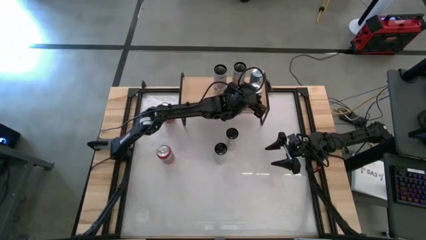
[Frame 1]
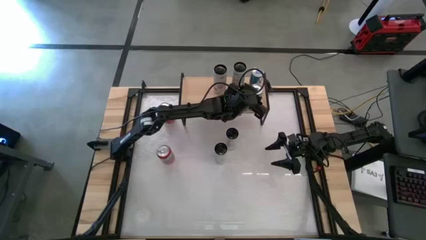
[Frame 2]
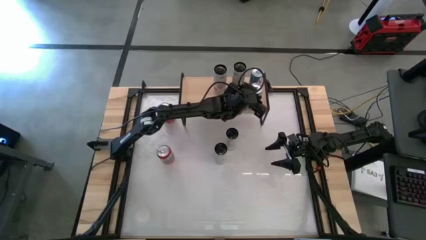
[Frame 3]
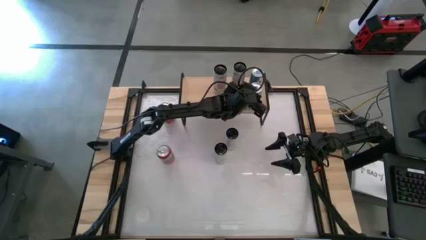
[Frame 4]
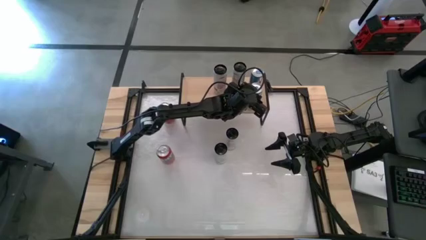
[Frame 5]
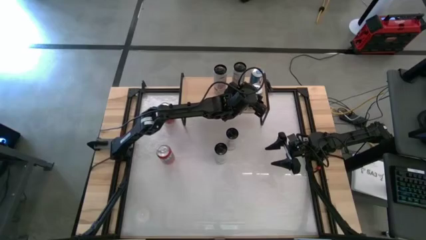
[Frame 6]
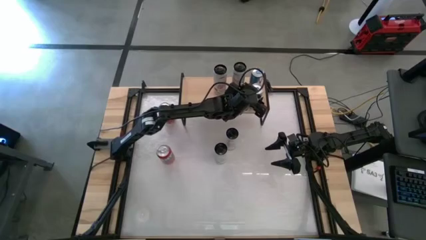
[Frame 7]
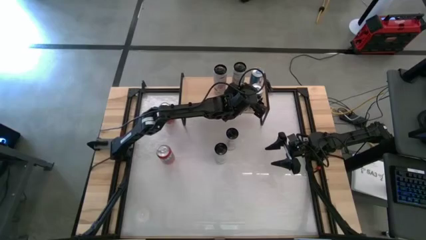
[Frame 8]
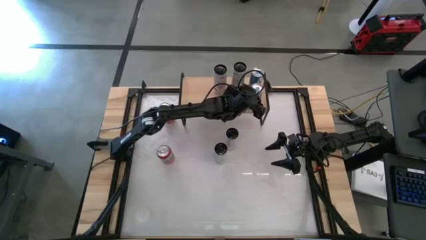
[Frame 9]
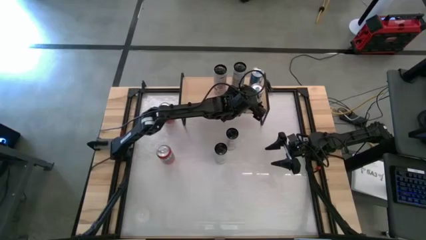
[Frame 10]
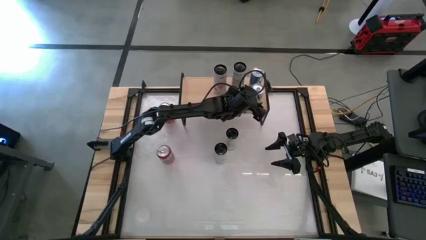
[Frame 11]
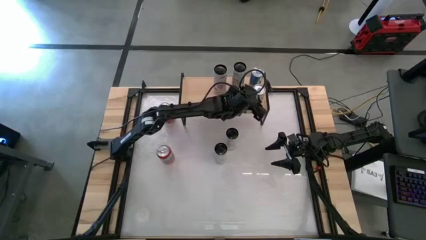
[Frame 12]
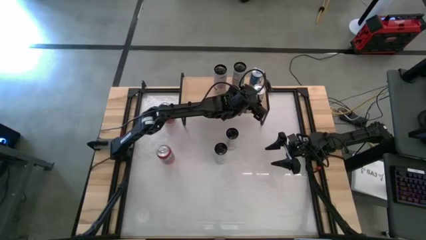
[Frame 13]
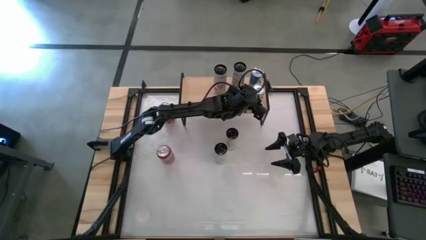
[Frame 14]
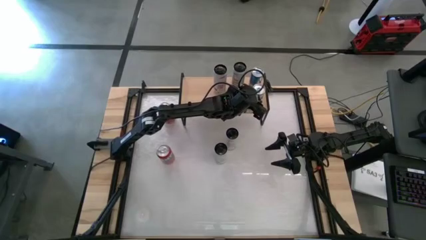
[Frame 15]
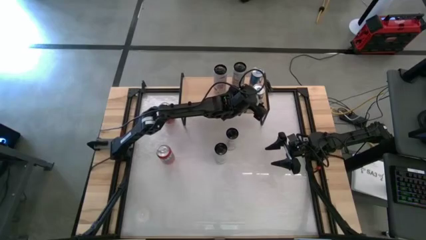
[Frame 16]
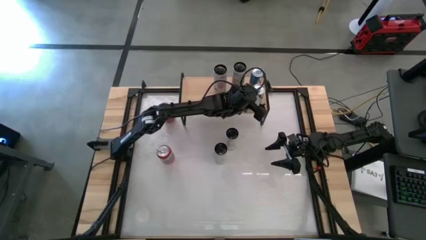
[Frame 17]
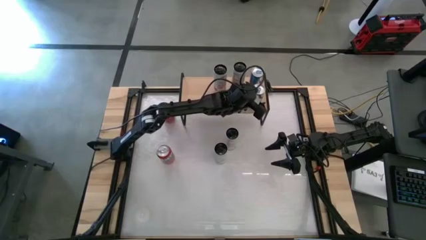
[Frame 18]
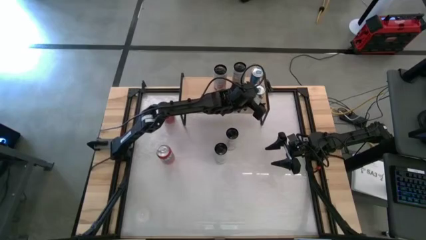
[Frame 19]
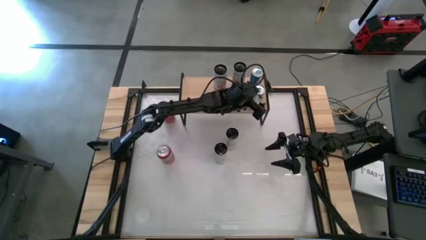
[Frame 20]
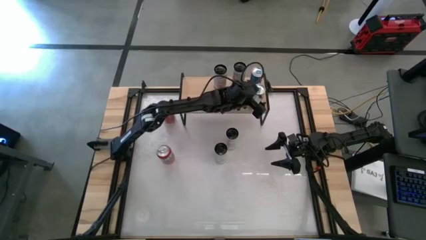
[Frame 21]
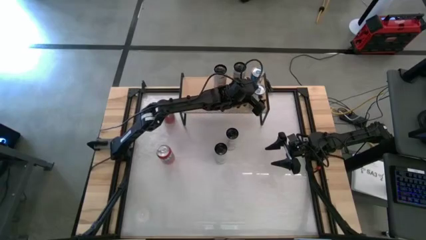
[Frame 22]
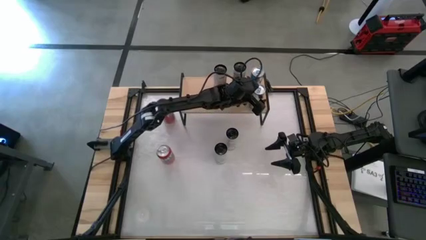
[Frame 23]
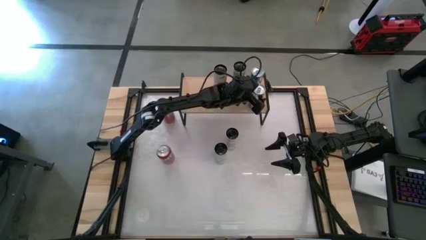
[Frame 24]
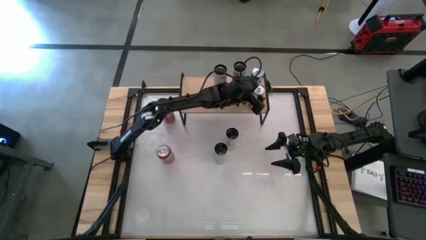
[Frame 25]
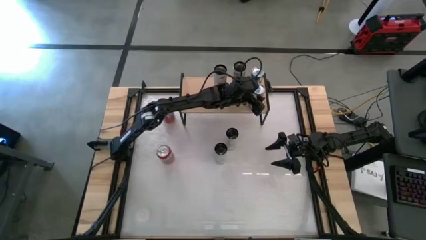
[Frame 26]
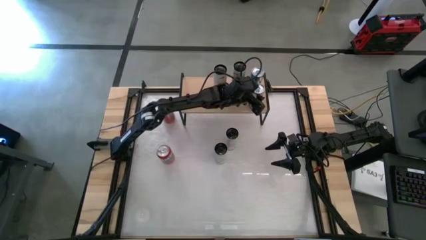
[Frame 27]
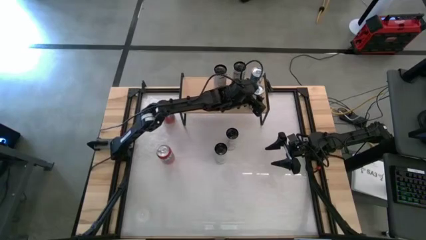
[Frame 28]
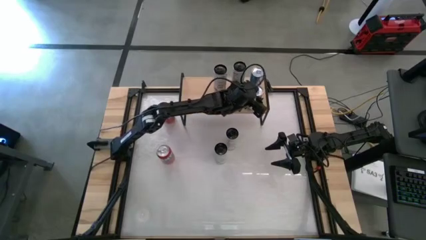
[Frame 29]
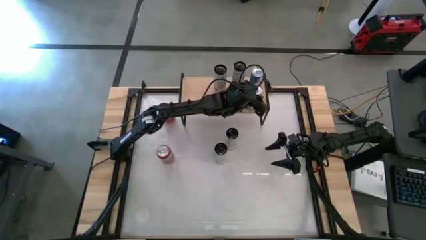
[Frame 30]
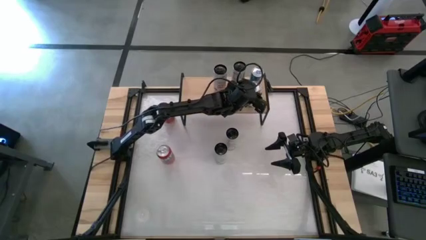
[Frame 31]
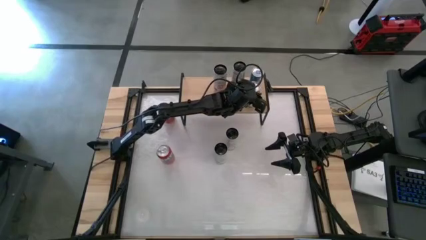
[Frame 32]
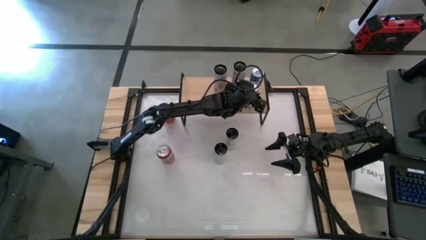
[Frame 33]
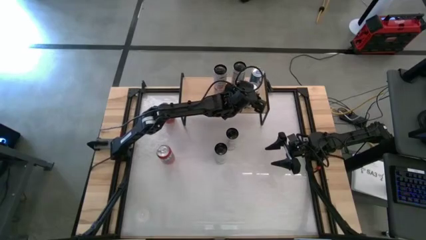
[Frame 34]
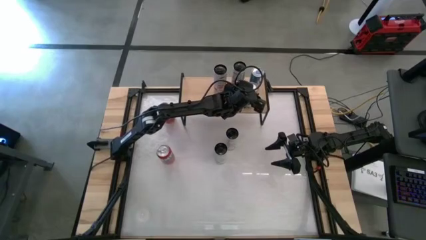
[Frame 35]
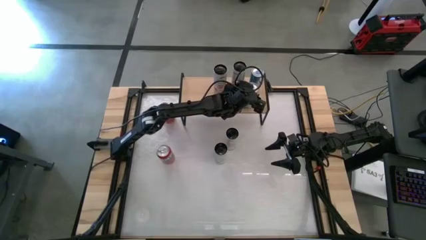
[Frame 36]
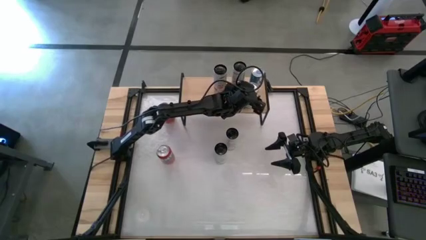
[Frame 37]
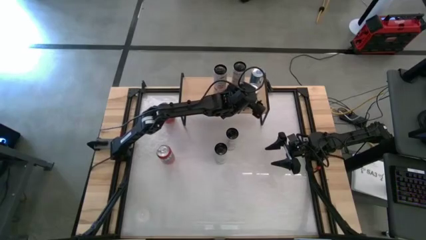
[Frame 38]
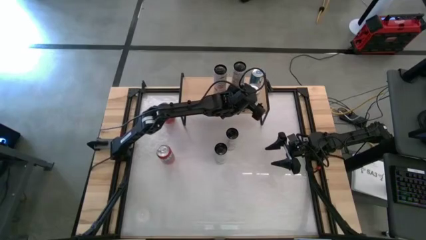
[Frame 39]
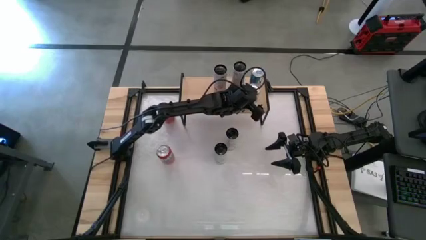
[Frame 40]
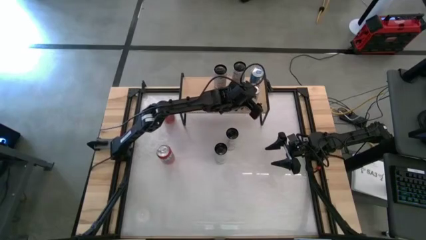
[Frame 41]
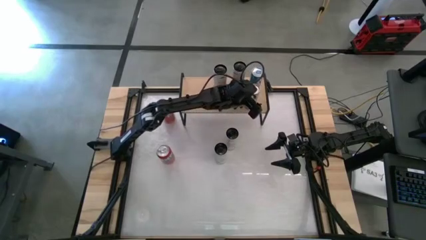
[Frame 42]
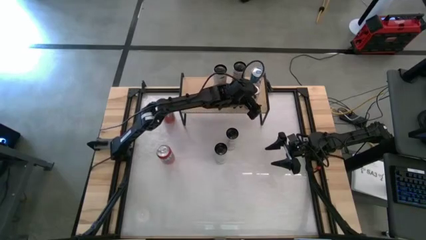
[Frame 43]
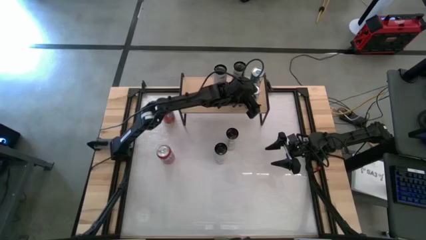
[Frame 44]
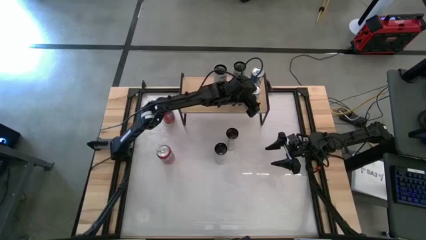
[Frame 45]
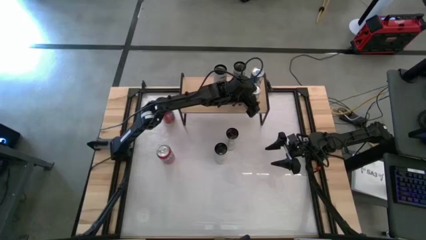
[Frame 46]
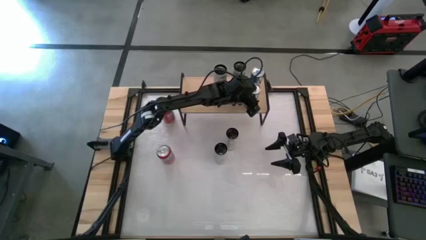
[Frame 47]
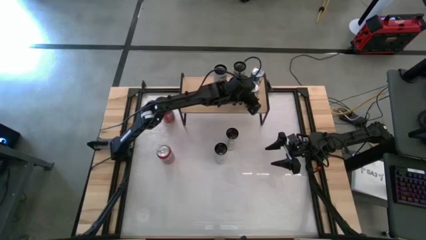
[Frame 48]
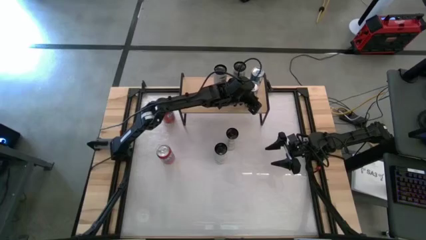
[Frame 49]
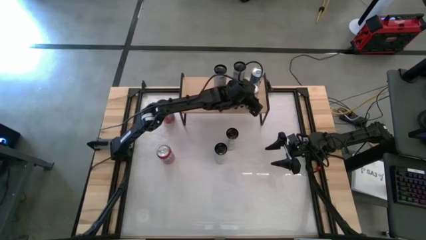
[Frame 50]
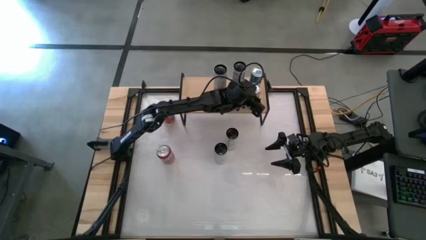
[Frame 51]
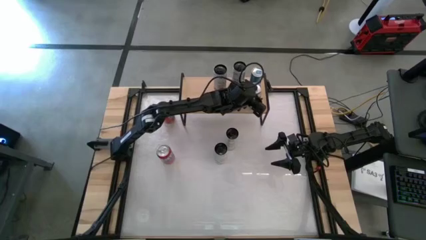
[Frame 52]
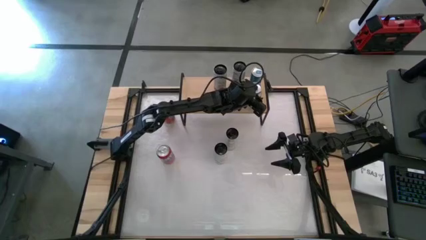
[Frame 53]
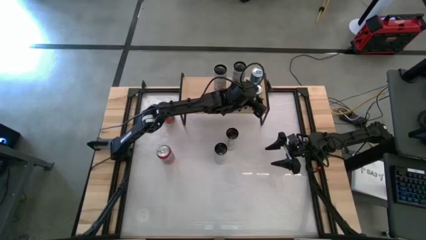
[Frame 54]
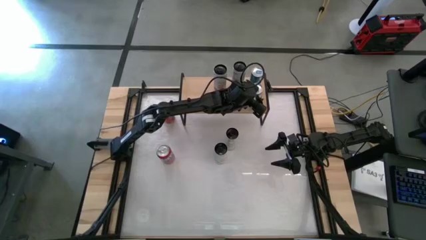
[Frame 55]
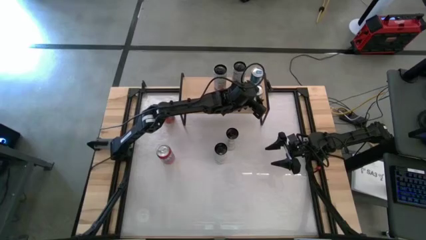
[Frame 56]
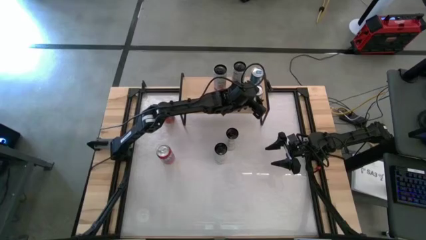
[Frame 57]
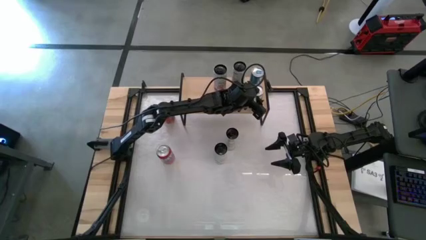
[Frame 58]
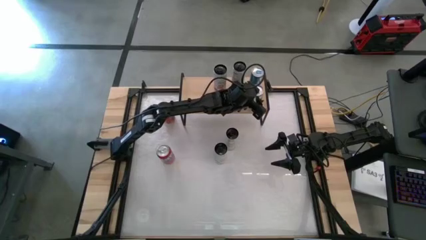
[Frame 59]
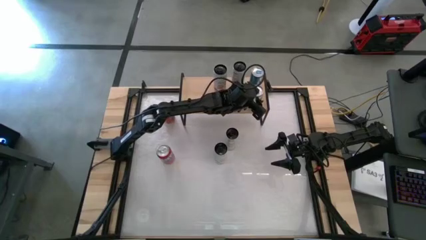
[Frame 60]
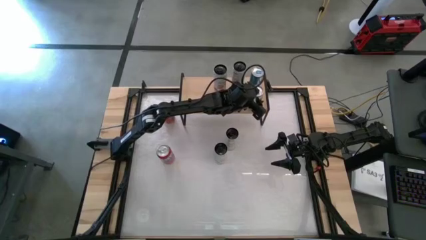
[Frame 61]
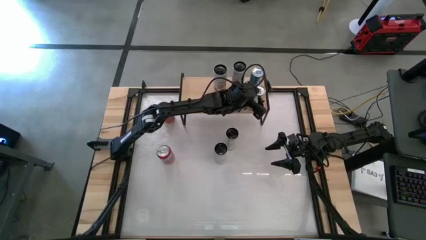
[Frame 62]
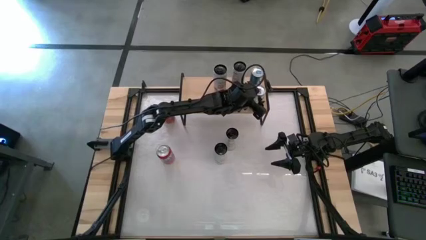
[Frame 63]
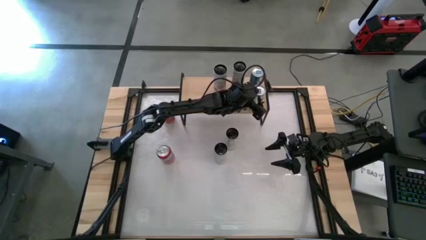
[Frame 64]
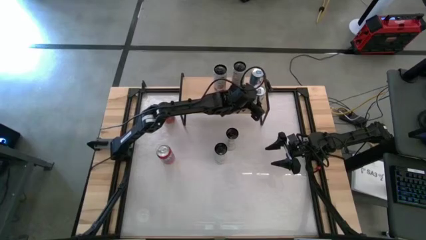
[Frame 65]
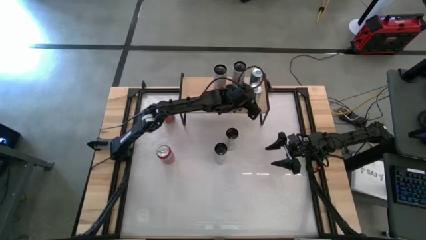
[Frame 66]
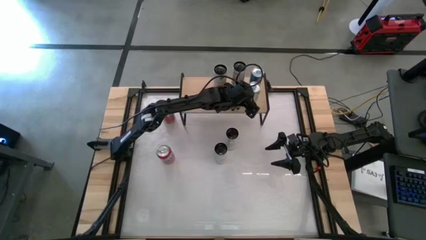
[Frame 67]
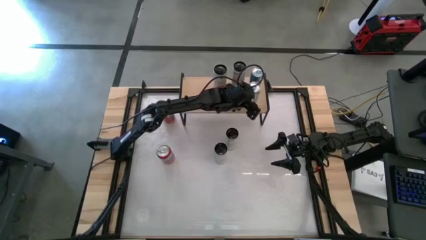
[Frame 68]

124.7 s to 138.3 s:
Task: Place canned beverage on shelf
Put the blue soda can on the shelf aligned with the other blue soda can

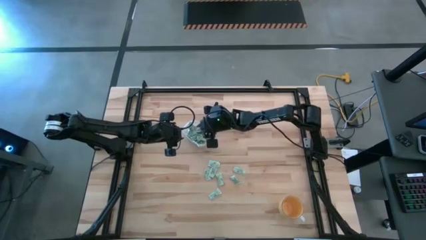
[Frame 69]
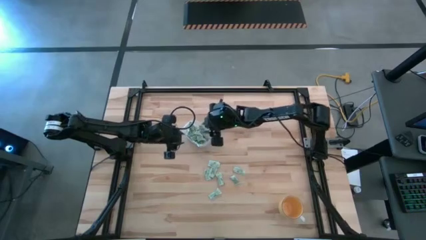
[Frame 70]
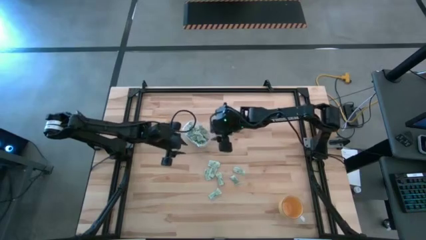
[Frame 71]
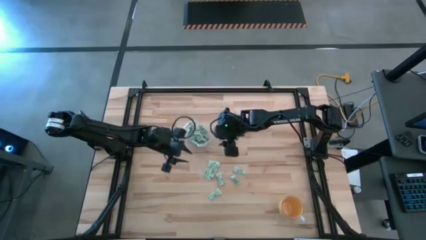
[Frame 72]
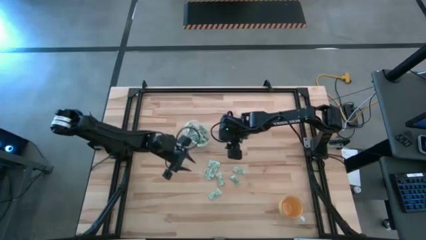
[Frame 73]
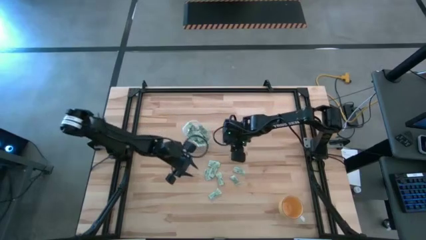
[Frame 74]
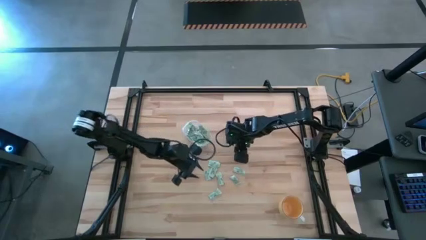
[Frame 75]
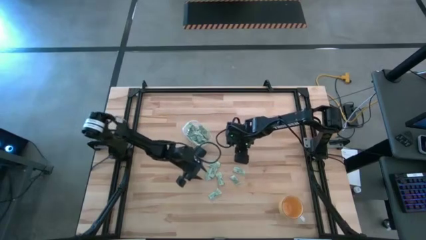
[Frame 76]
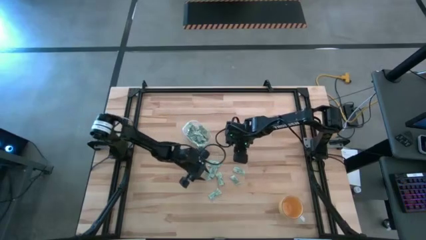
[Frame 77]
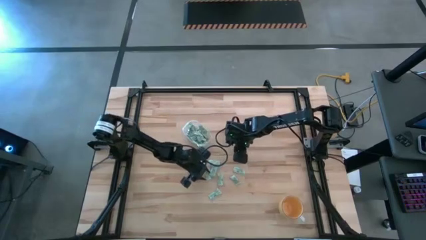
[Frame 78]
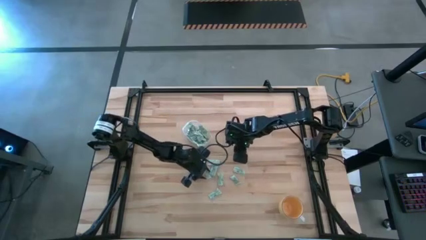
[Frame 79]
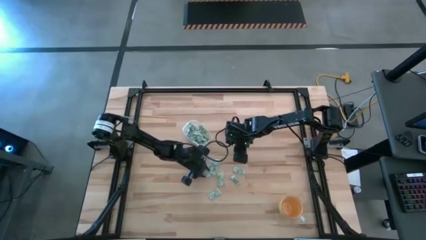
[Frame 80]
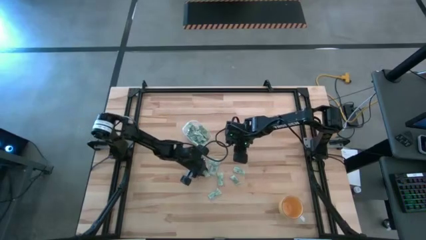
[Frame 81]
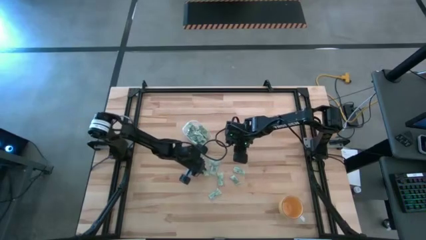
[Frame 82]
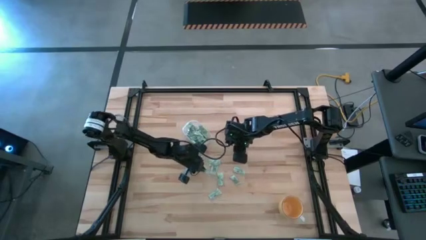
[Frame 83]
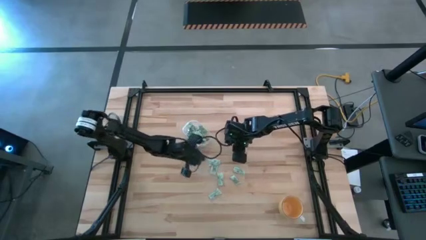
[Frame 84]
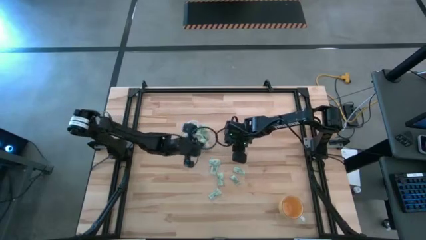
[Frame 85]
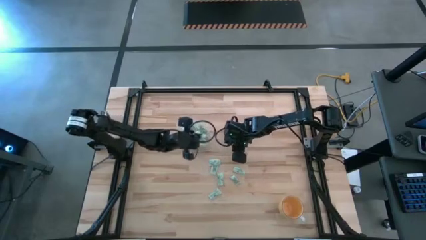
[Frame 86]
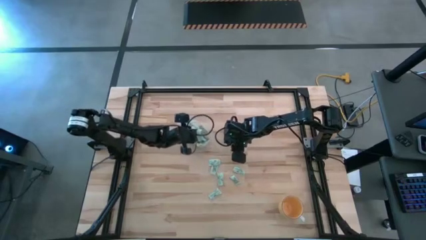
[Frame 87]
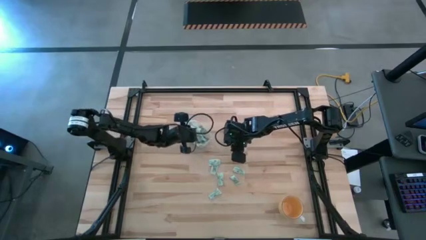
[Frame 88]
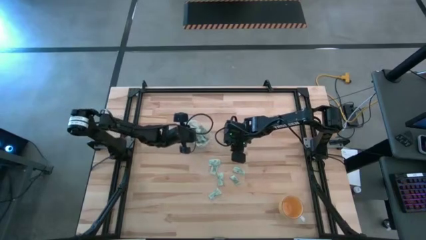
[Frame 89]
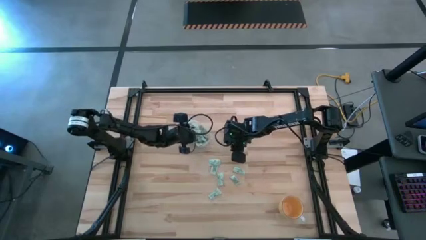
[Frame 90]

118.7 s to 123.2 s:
Task: Pick and place Stevia / Truvia into bins
Put the stevia packet into the transparent bin
